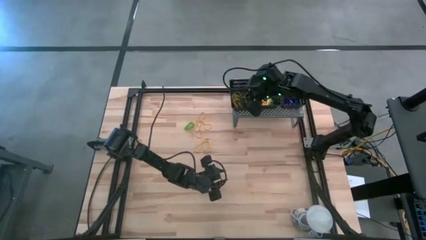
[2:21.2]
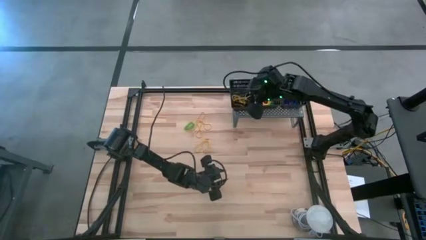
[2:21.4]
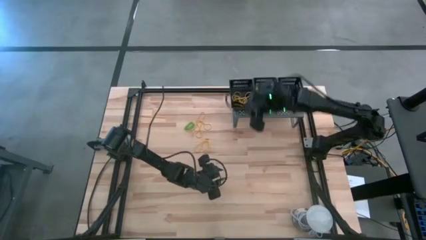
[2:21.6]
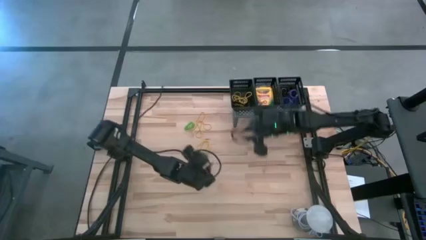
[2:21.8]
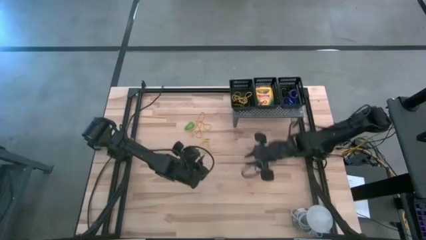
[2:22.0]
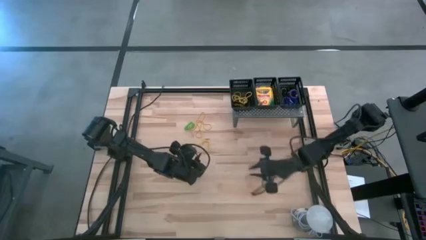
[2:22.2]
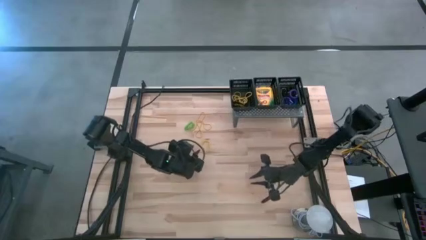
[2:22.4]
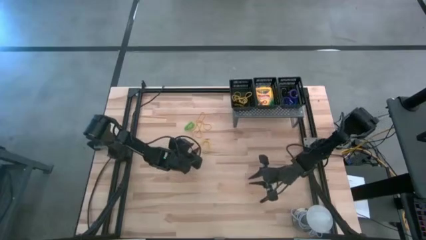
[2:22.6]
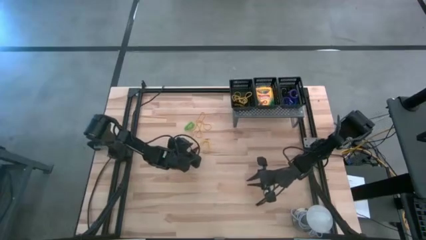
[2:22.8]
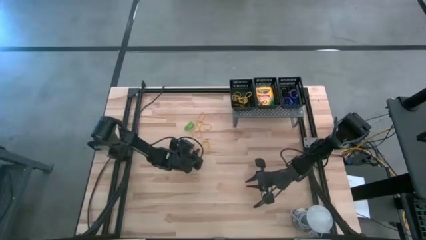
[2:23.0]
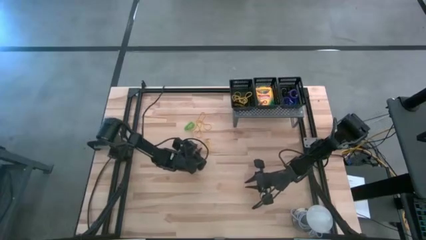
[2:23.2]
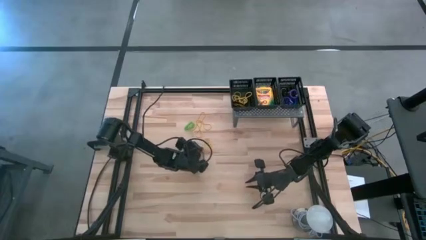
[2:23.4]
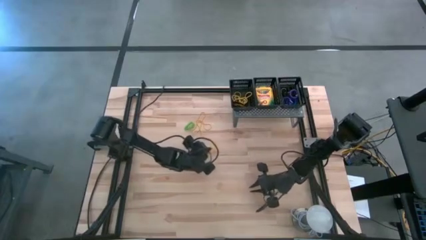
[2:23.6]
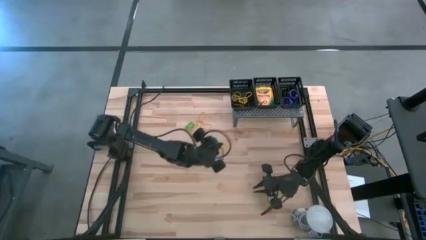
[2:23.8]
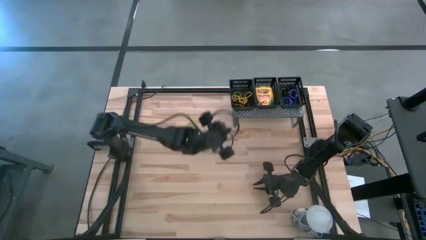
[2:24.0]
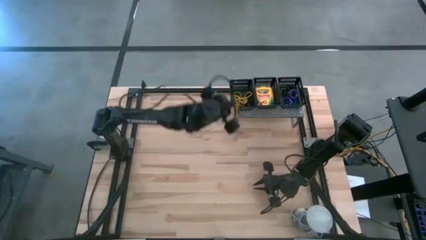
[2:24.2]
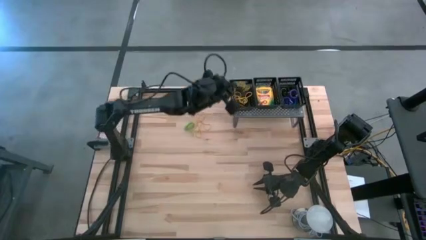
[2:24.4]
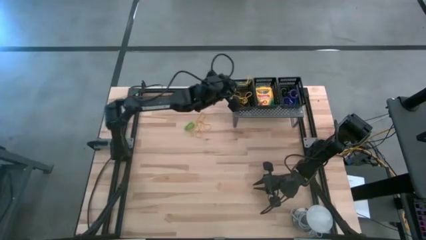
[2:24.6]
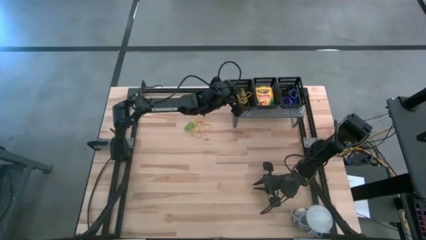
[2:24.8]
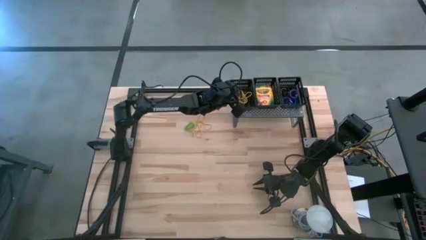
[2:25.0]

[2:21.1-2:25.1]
Task: Pick & Place Office Desk Supplies
Put the yellow rubber band into the left black basket on the shelf

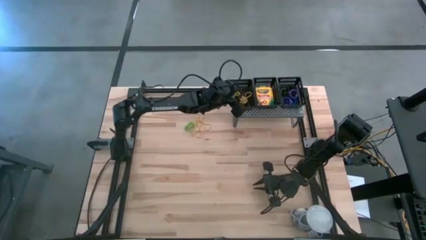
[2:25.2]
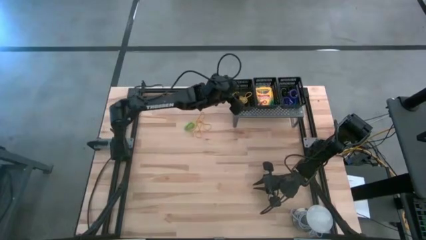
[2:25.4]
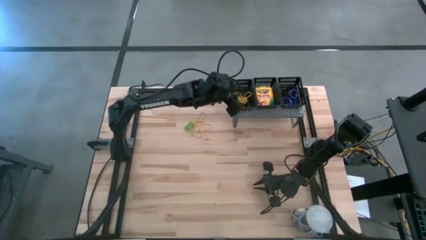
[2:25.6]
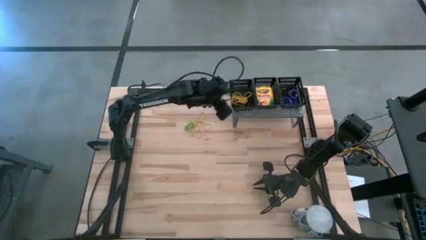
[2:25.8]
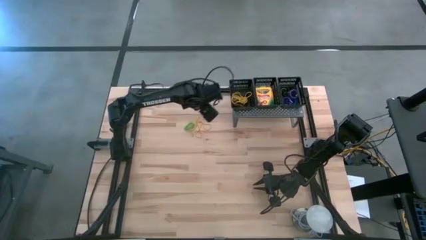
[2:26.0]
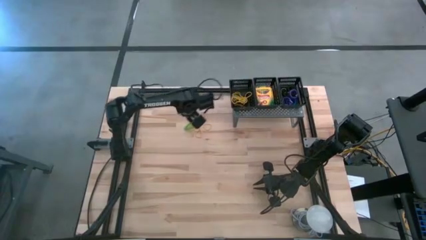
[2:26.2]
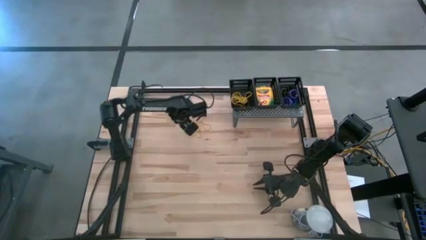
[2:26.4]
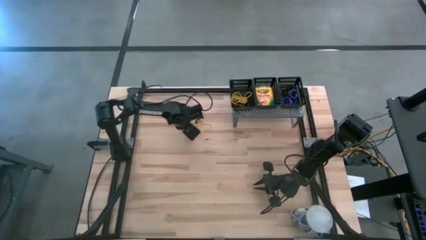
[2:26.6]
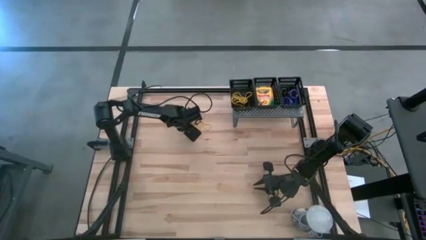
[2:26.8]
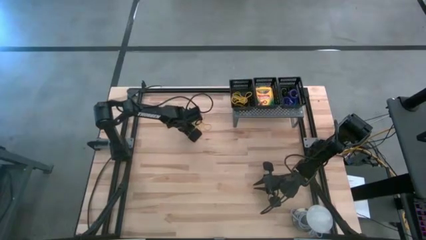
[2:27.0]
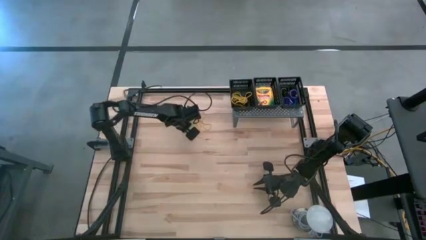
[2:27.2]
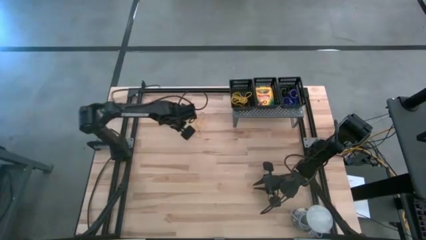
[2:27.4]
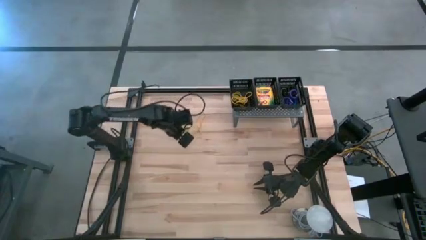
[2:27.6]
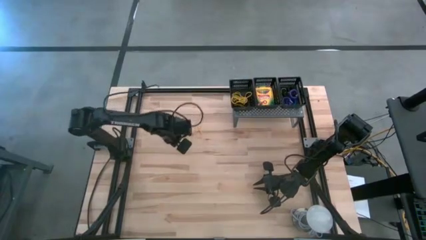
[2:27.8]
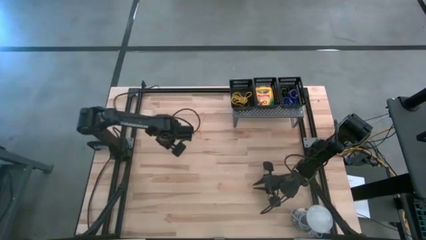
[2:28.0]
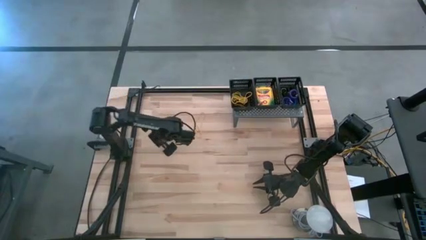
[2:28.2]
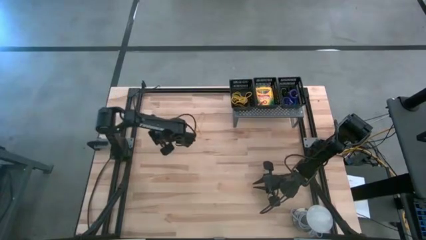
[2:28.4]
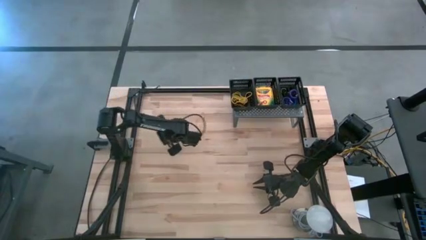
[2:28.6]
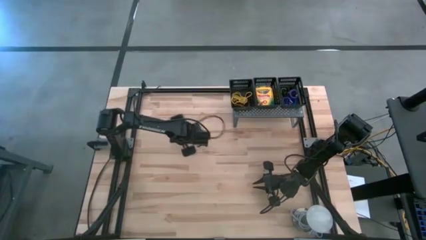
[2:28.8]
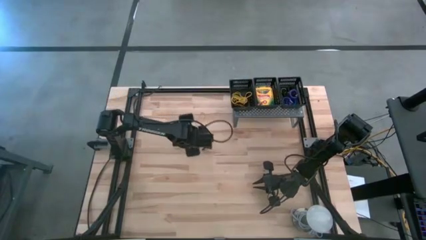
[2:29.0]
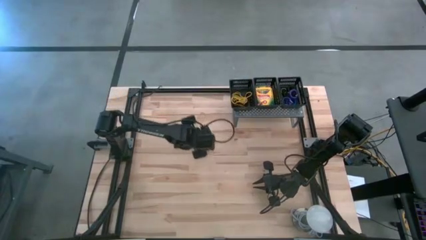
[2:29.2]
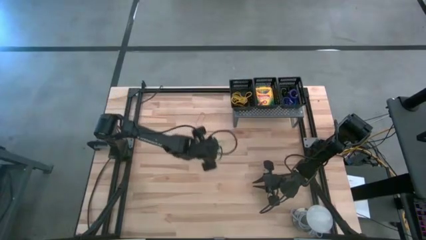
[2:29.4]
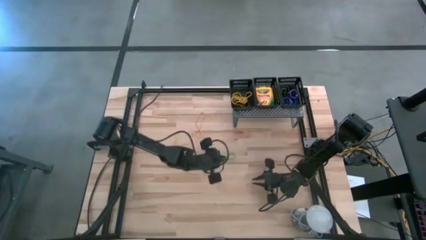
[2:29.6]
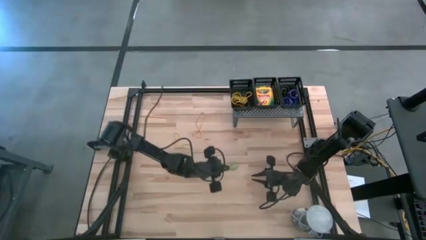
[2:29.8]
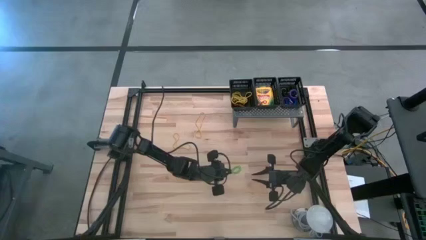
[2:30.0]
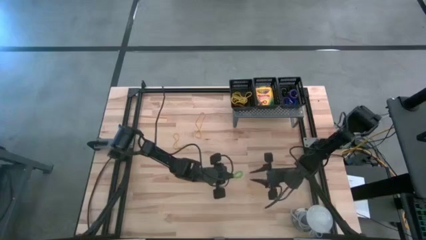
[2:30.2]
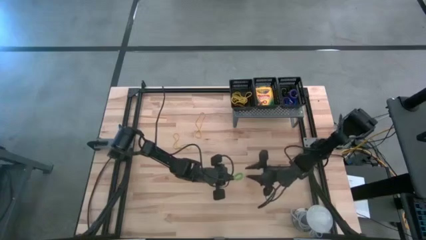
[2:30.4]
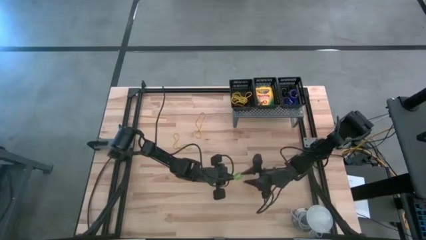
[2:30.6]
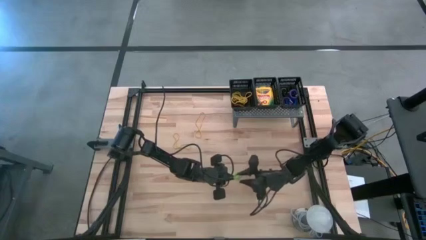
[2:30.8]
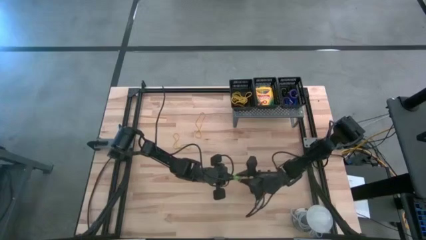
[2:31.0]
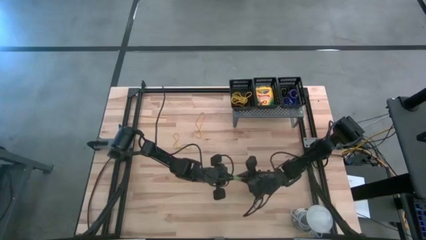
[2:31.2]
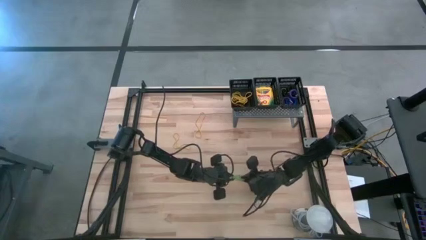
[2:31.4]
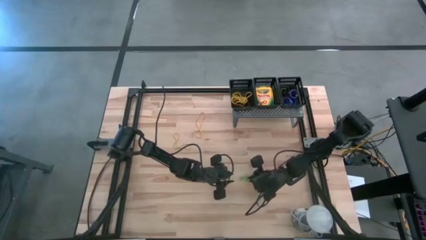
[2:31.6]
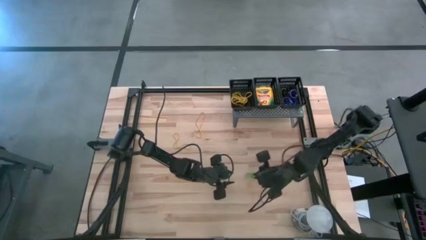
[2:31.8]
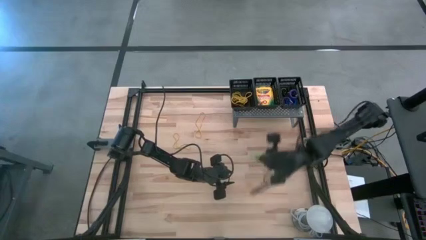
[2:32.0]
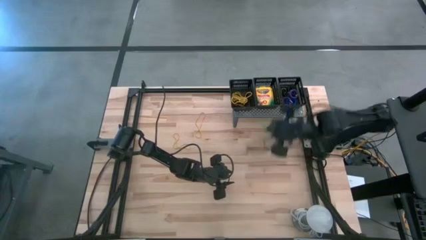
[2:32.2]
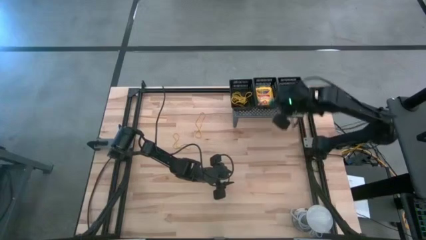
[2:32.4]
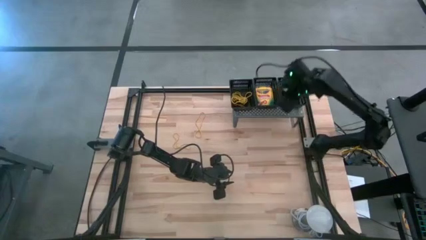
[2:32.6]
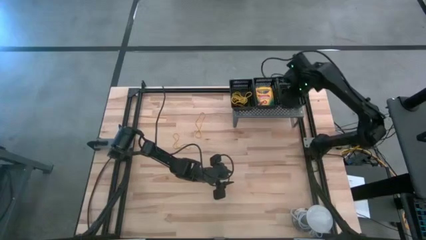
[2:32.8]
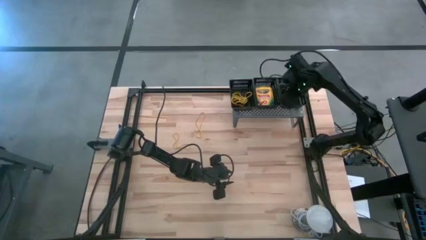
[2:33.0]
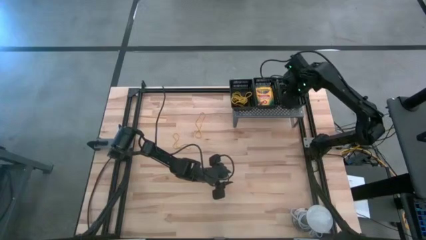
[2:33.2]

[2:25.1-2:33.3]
Put the green spring keychain into the right black basket on the shelf

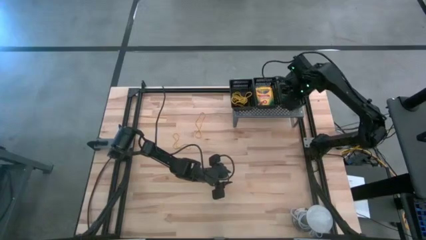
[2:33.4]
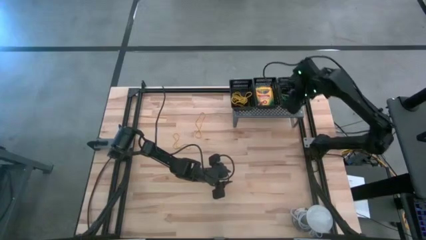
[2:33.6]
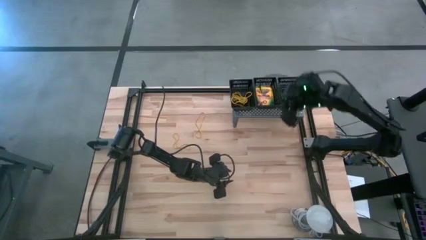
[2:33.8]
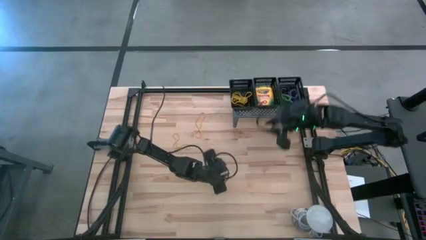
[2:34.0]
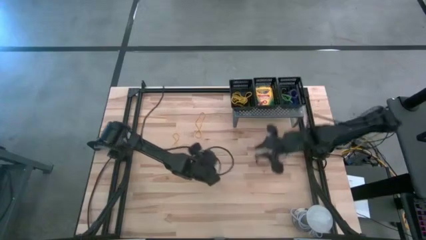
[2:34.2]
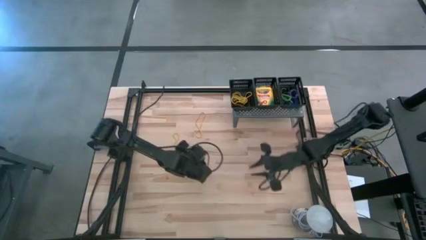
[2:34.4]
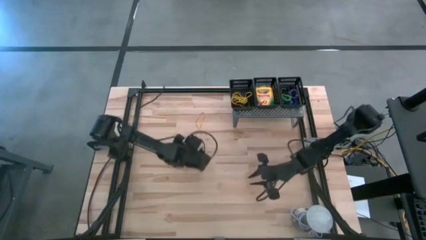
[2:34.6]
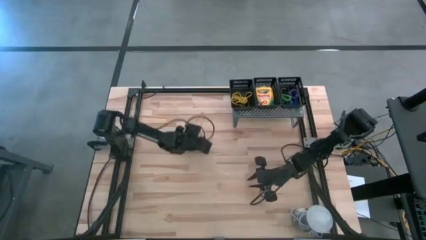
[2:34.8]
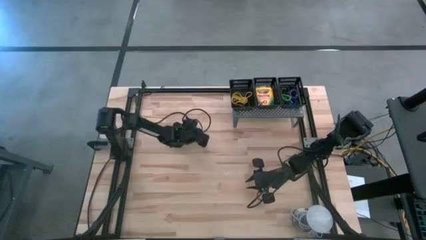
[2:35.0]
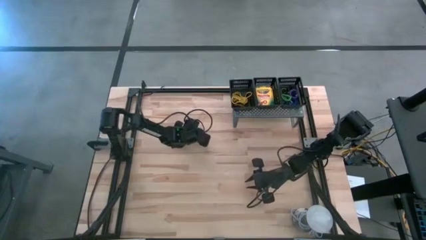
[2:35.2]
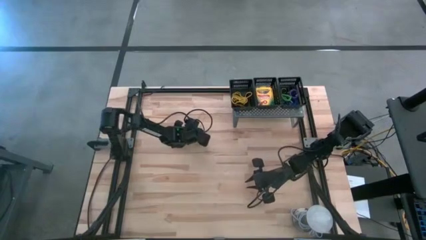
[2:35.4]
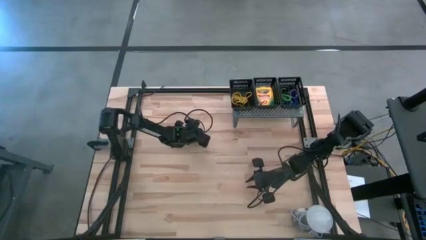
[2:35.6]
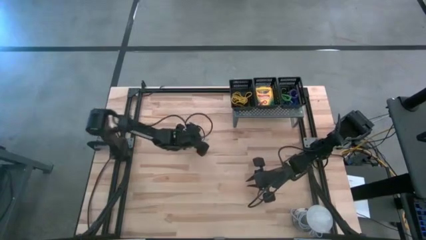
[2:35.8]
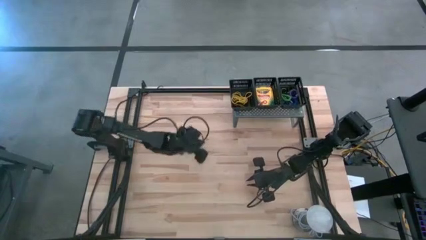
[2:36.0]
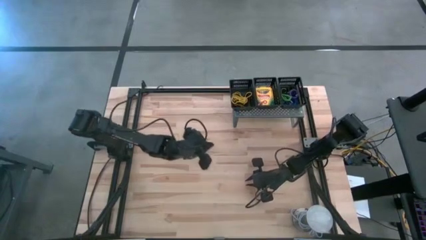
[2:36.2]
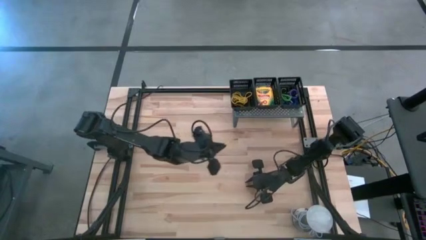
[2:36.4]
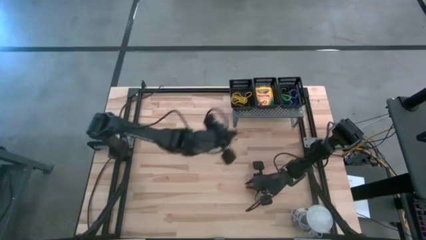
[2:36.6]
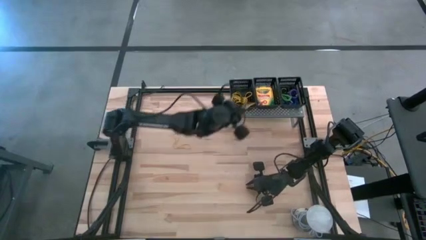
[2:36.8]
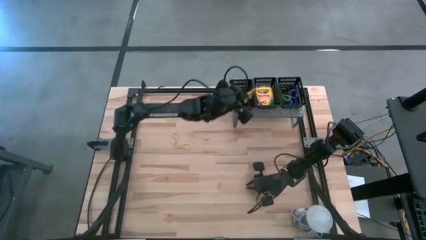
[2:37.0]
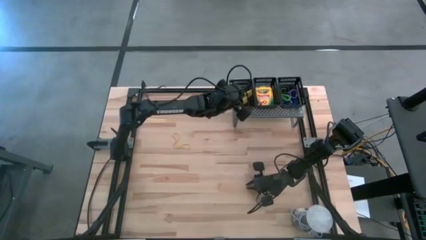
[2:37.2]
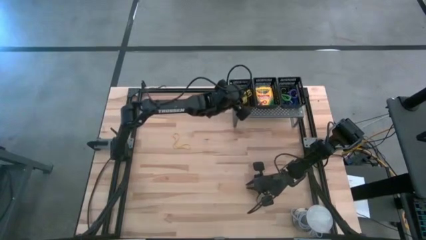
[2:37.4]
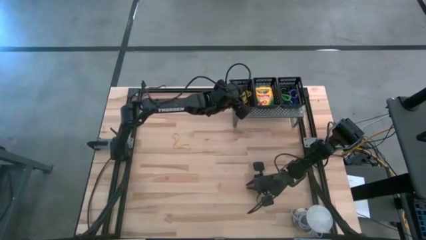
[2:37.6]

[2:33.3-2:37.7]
Put the yellow rubber band into the left black basket on the shelf
